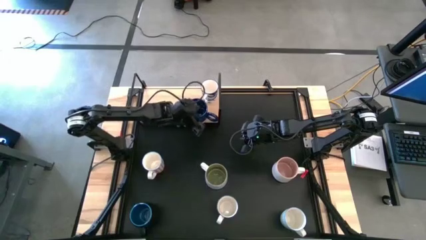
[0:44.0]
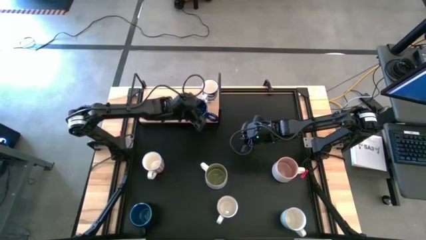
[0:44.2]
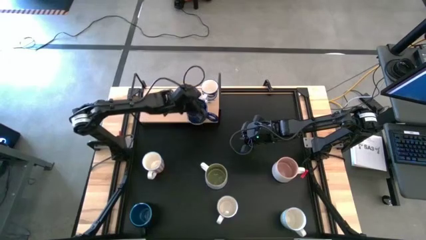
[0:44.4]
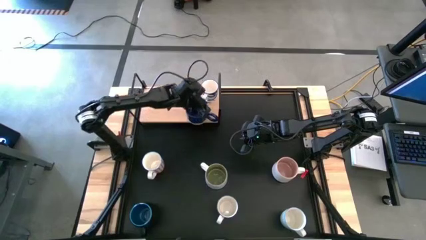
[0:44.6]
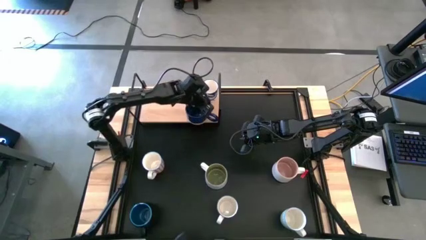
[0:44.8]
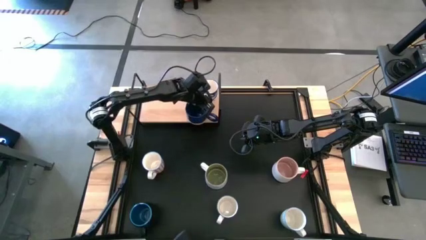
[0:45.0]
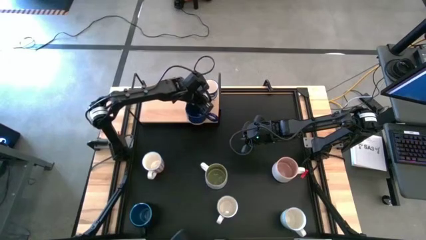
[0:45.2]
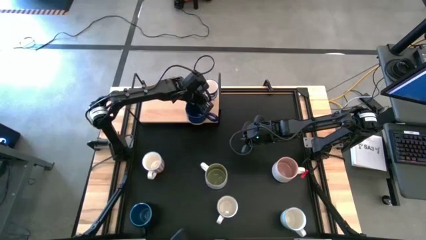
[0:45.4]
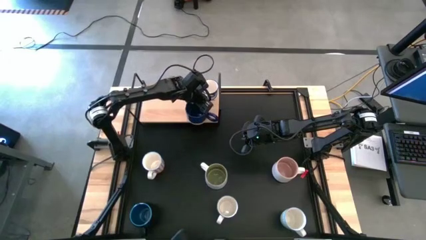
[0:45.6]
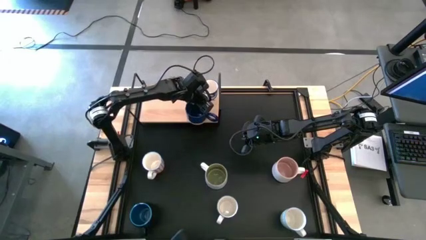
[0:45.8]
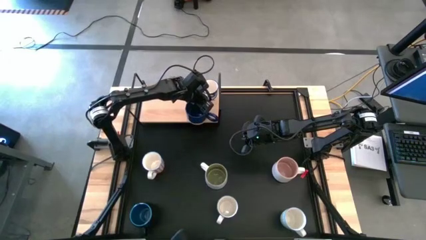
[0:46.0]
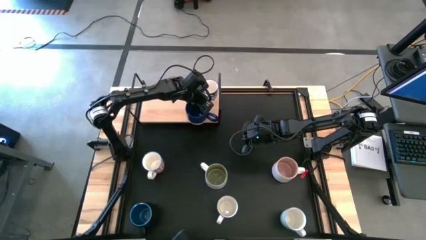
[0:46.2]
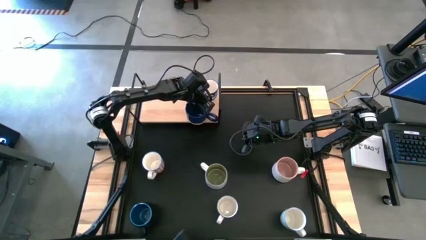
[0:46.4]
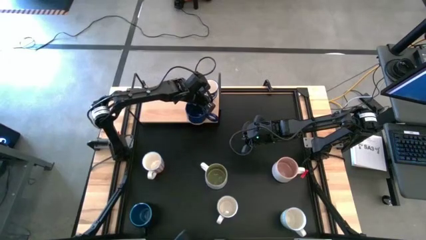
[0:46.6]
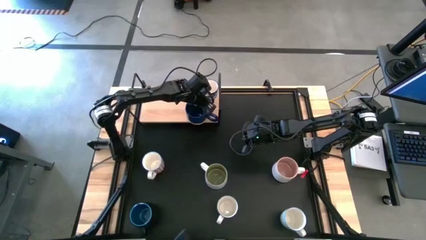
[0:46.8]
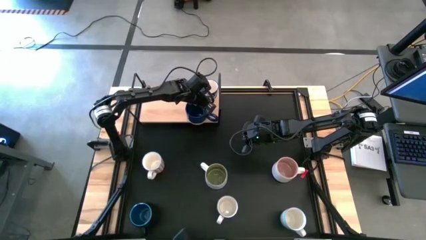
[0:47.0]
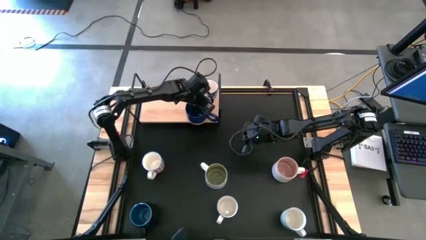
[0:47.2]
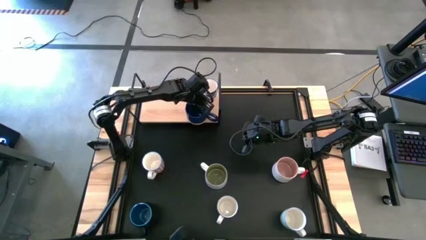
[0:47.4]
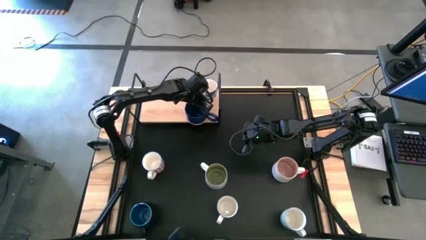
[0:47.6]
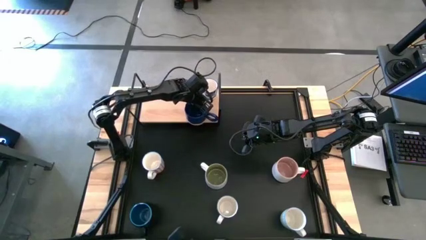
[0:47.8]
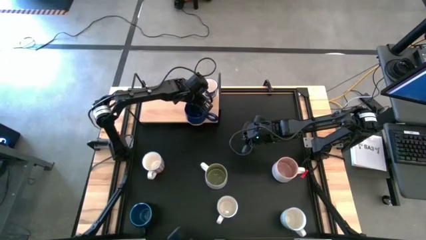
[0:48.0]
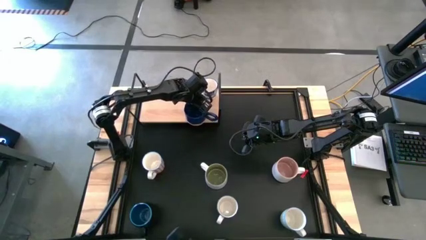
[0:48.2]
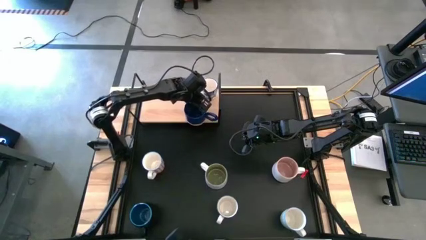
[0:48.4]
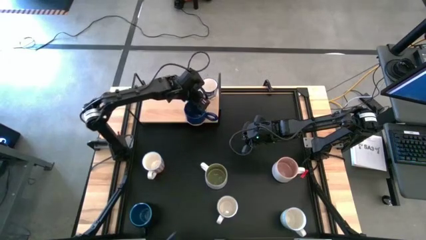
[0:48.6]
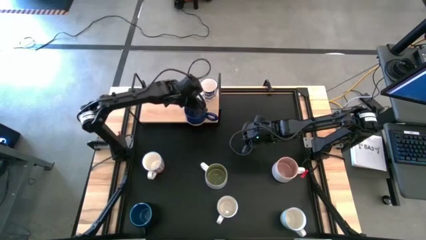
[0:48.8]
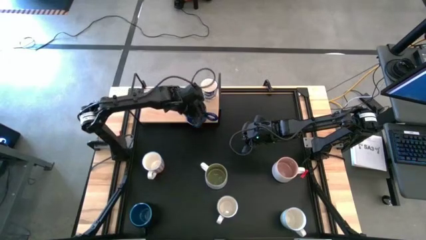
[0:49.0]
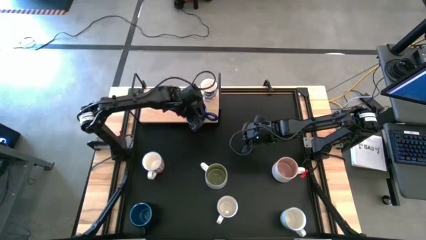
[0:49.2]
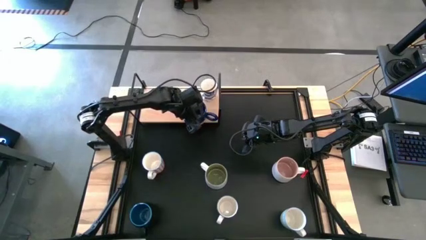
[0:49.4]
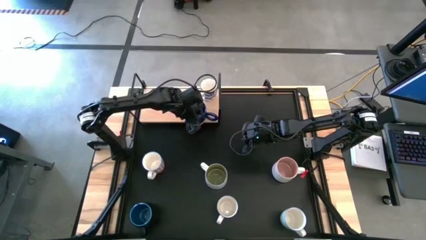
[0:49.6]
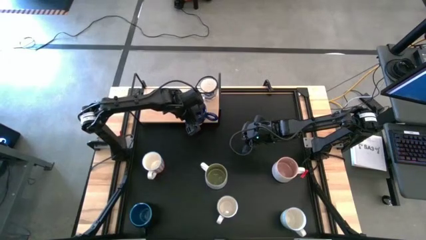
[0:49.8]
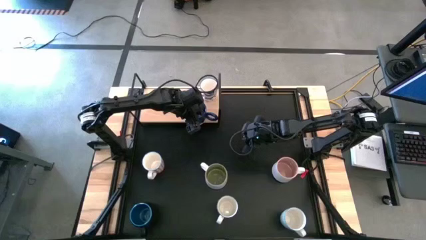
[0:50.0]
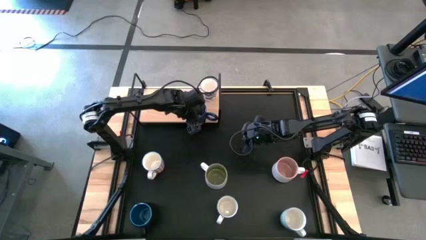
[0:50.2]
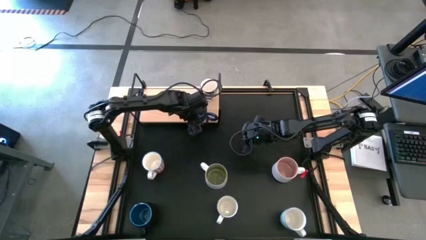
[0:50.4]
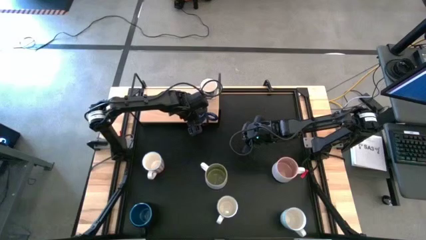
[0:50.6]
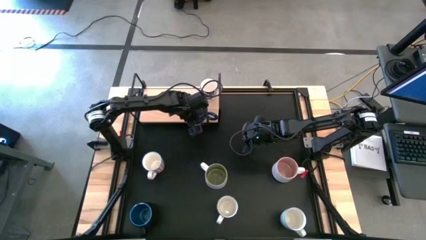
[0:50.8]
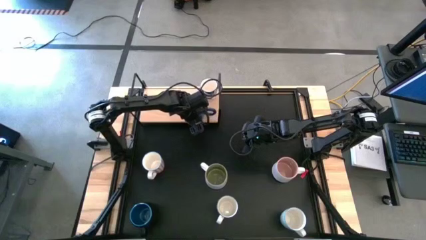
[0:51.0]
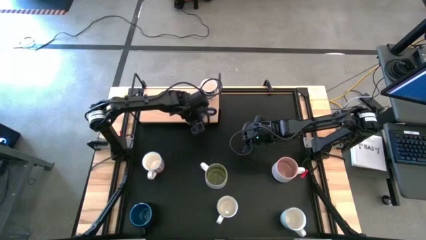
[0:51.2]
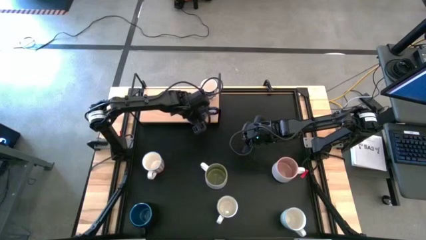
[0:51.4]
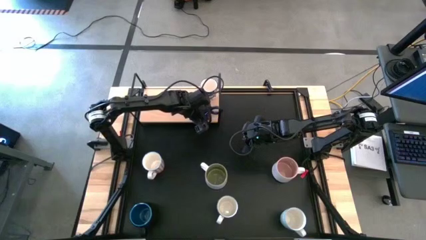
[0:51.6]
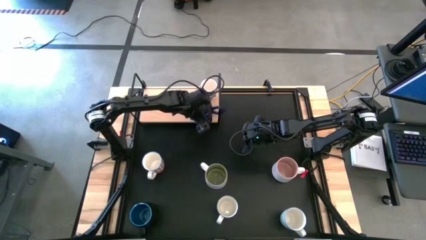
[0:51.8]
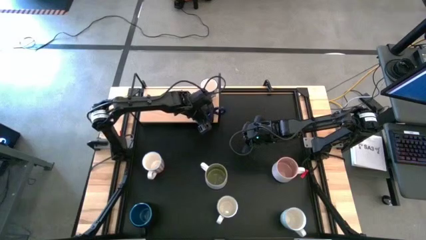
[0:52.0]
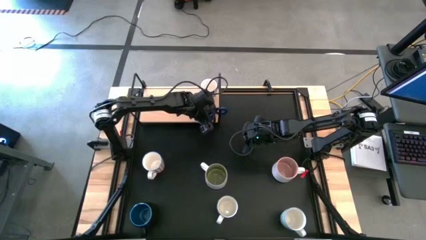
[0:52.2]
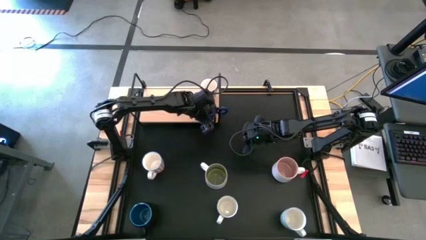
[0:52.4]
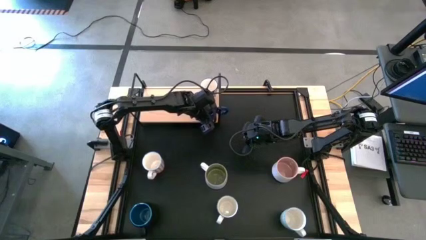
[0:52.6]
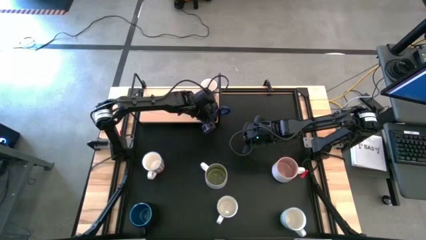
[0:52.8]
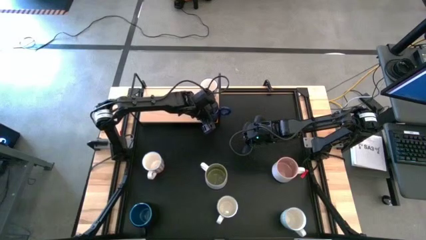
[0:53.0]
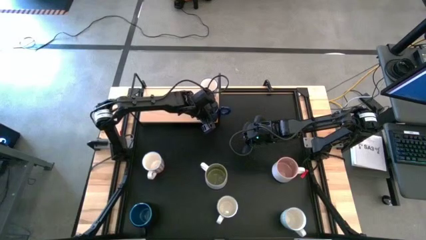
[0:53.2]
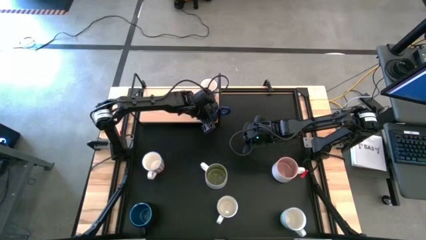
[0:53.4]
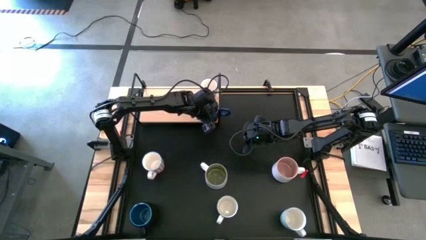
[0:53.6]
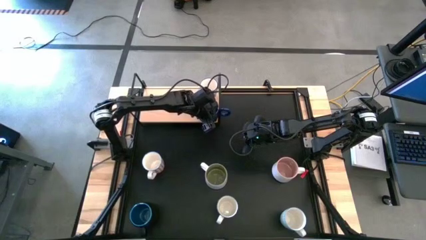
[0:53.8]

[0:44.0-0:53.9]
Task: Place coffee mugs
Adjust the mugs on the shelf

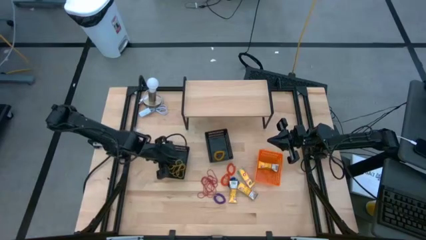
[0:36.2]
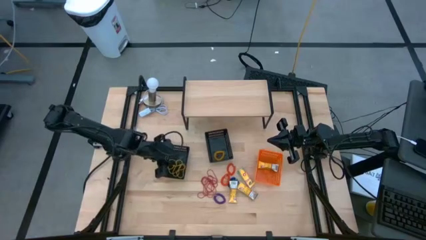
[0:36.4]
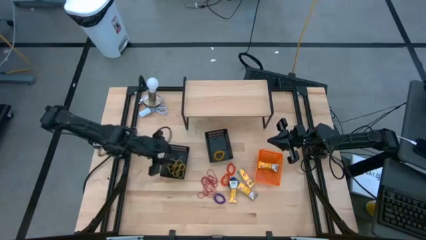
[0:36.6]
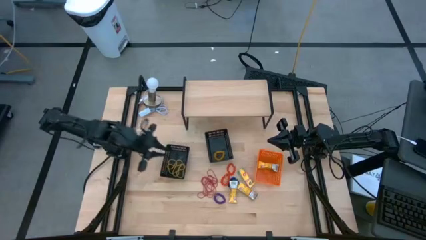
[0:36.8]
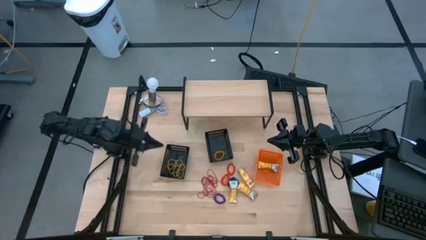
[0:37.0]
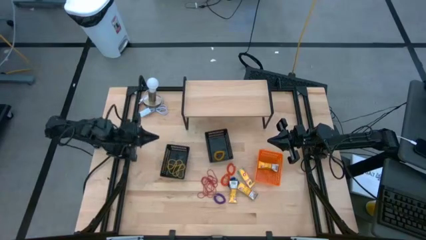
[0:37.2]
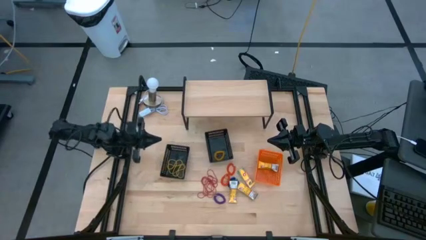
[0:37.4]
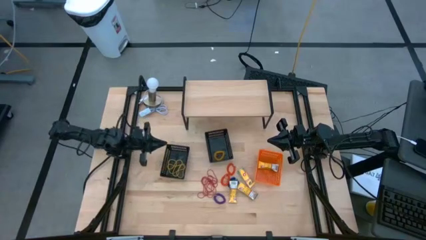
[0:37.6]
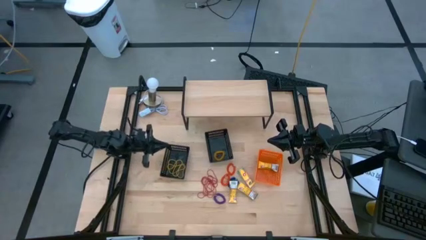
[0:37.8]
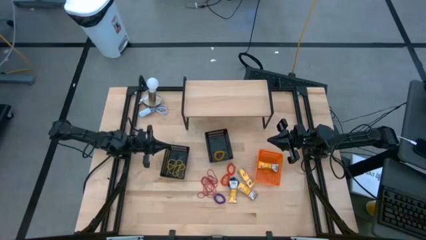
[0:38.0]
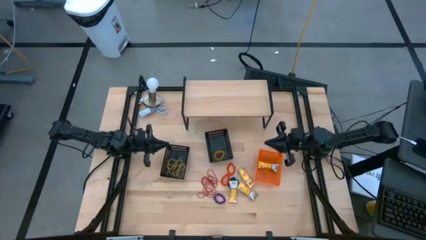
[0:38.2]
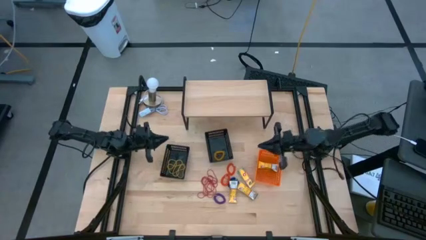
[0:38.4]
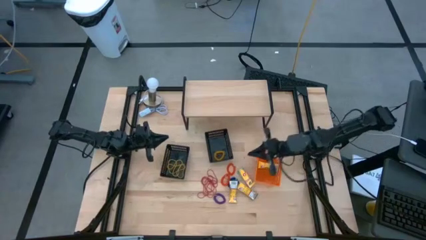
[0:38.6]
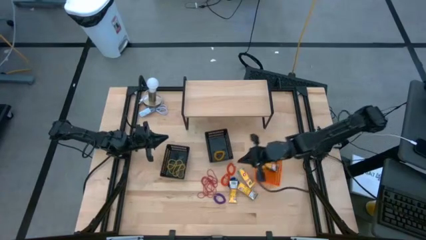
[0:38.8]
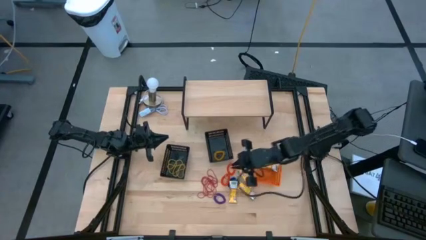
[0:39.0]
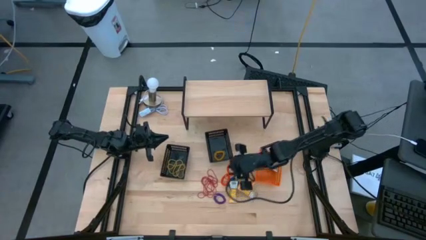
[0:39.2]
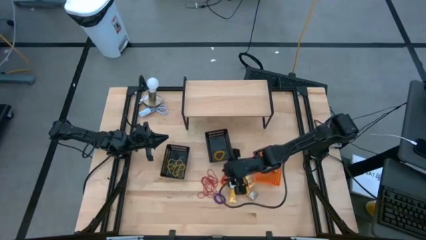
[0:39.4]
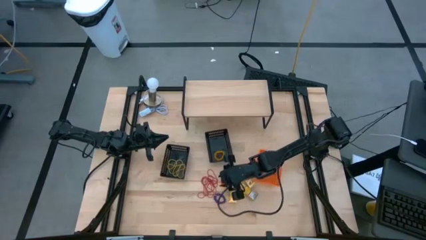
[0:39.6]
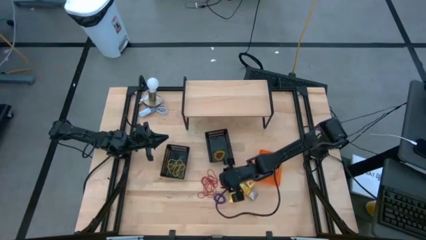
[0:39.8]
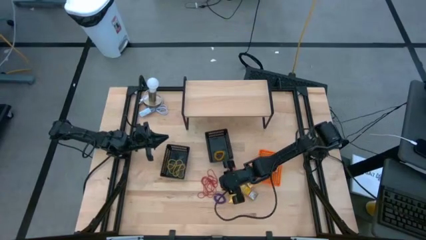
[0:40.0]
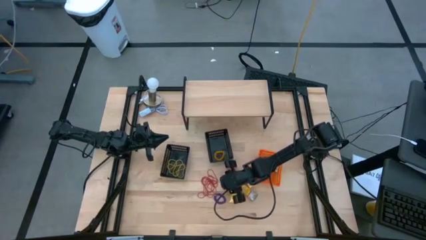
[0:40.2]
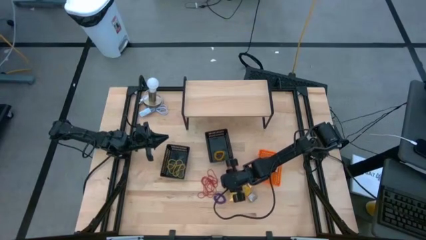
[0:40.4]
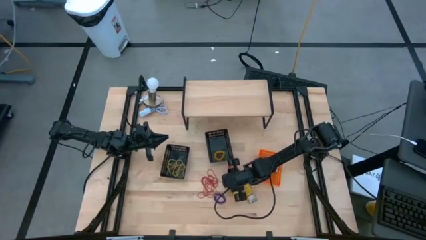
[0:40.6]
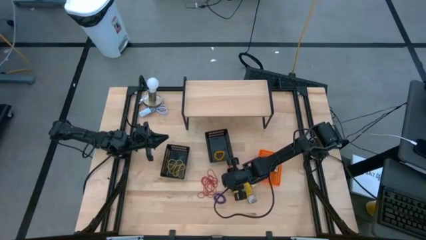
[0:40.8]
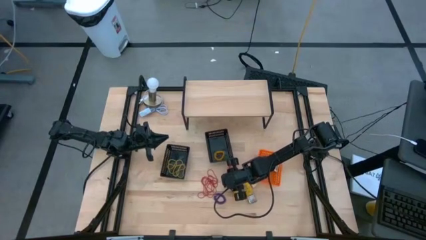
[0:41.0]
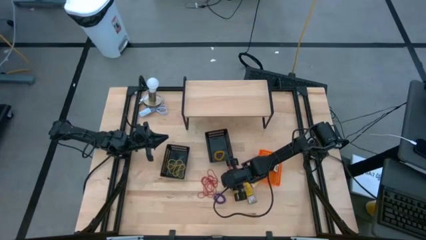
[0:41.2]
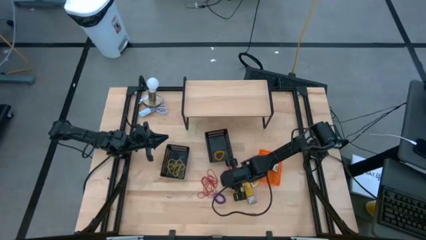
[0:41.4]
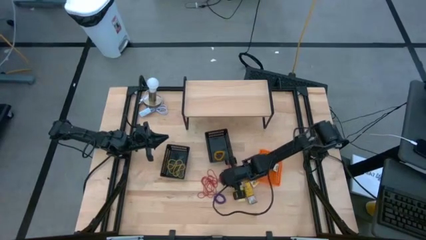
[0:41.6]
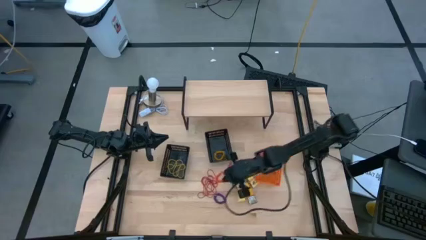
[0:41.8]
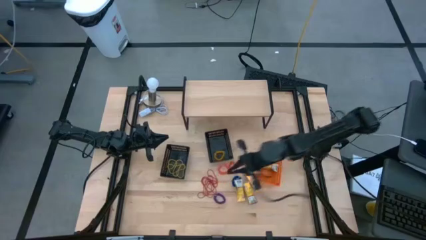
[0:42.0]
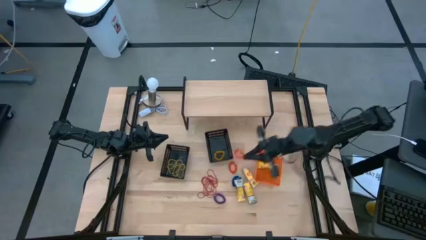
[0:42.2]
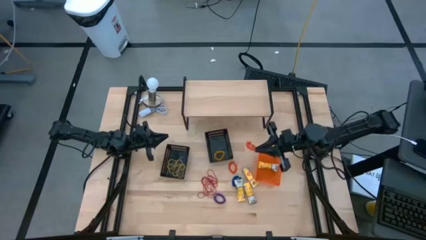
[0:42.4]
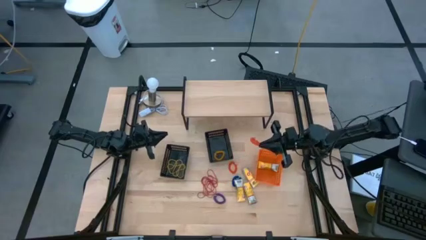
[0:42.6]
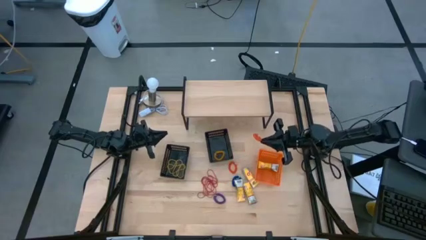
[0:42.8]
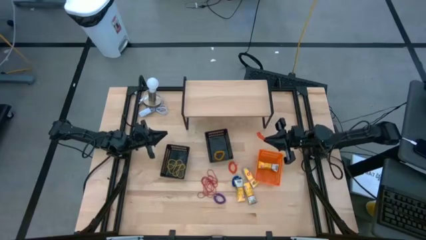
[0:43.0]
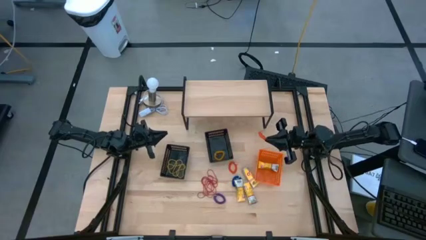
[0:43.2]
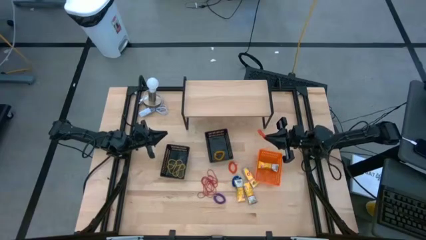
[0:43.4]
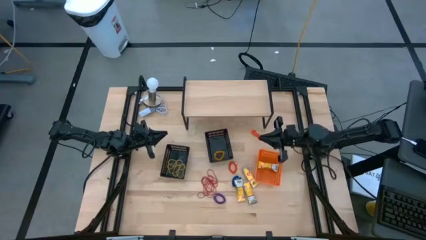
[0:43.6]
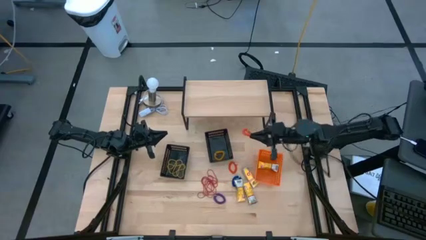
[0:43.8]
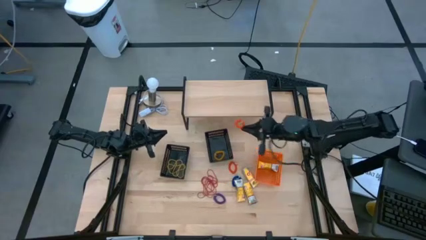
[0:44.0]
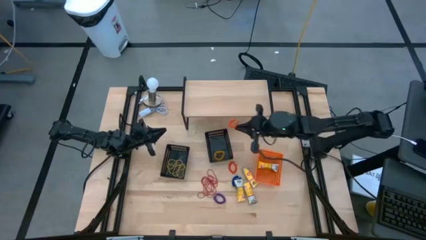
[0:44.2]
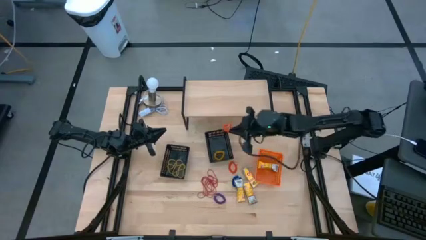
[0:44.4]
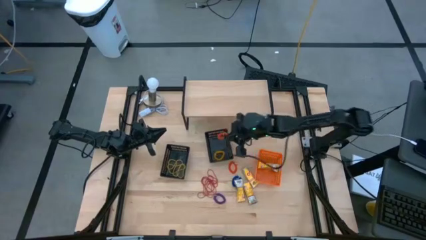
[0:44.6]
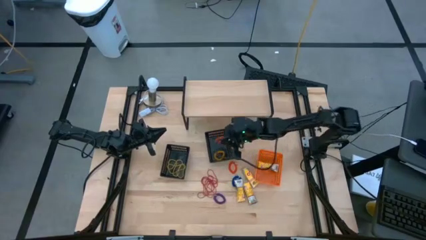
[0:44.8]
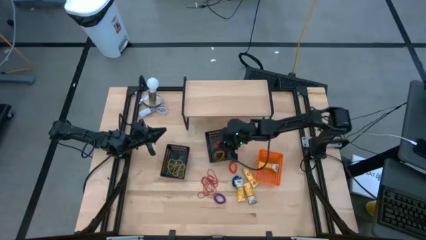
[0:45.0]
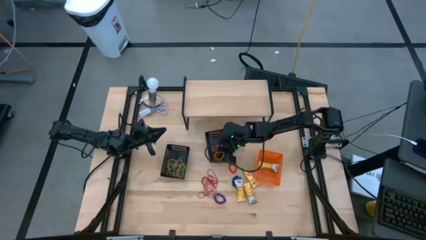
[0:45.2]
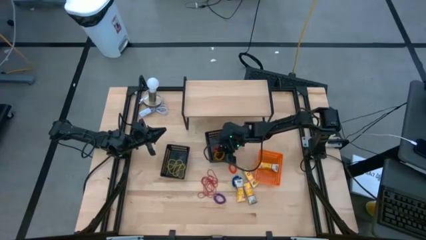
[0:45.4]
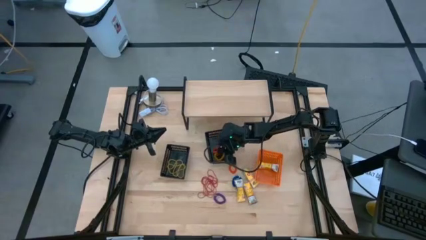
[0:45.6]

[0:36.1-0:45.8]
Task: Pick & Place Office Desk Supplies
Put the orange spring keychain into the right black bin
